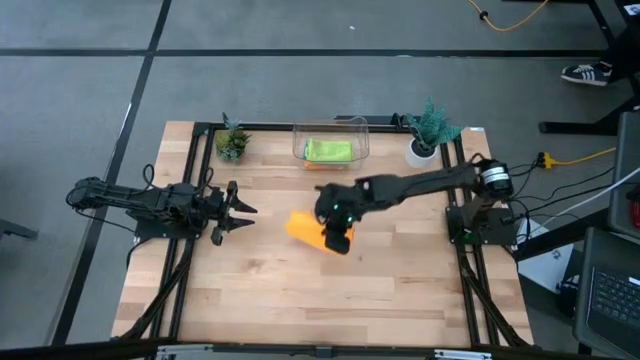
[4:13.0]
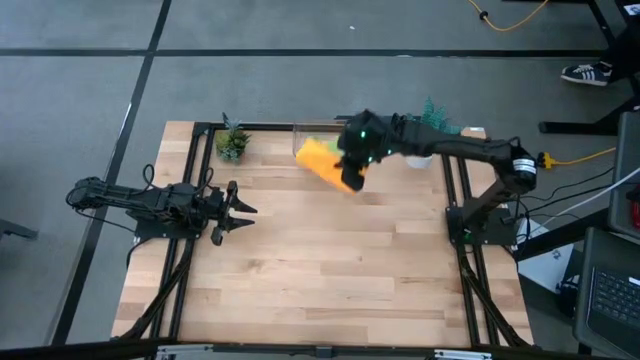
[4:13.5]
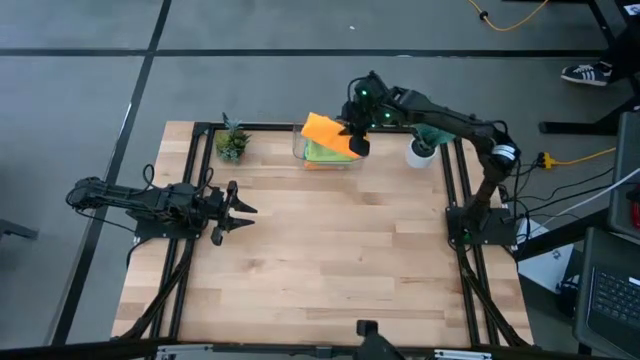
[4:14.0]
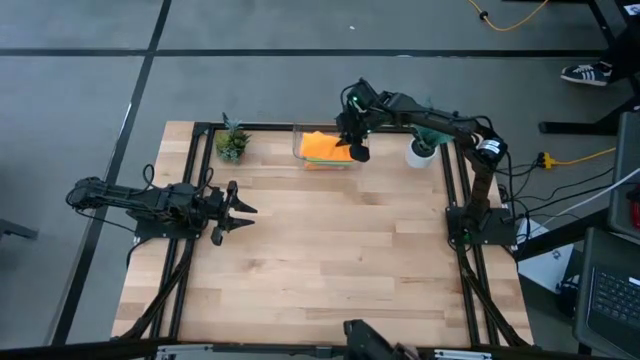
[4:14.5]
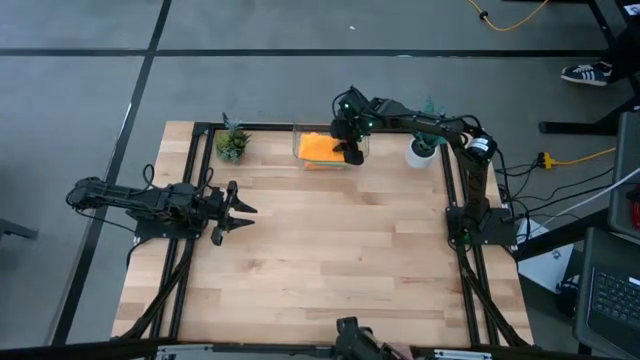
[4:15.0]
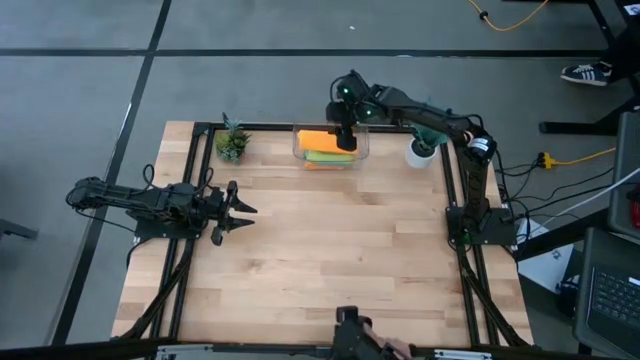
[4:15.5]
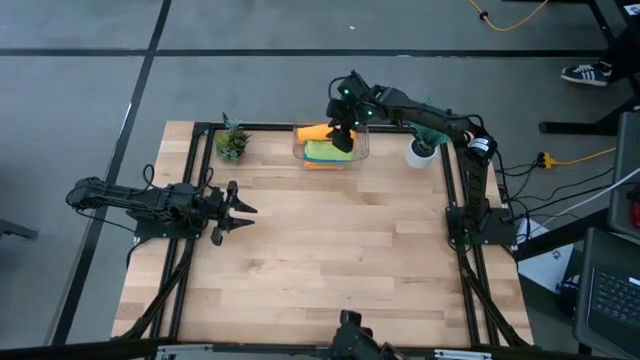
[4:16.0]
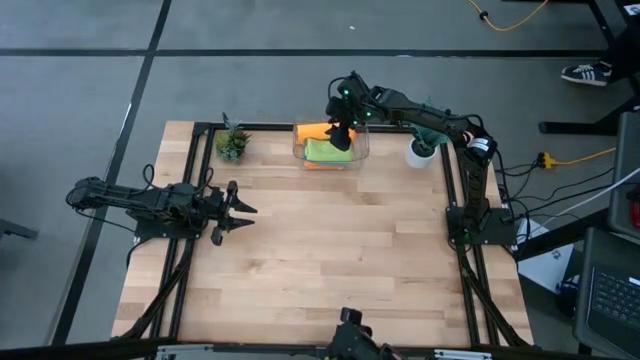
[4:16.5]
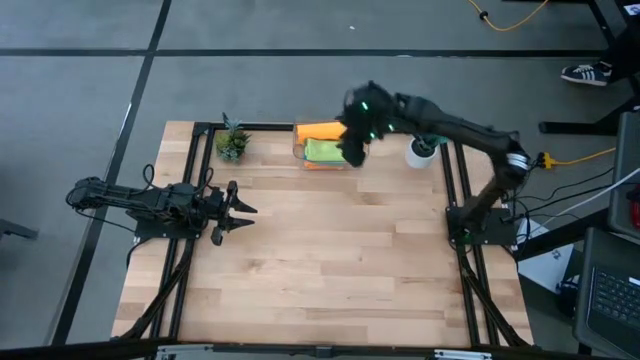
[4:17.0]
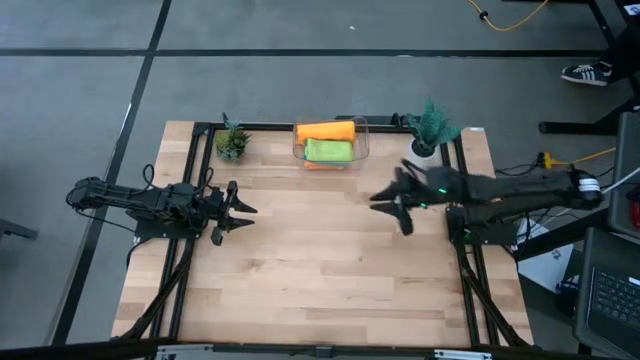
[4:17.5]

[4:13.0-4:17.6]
Task: Fold microfiber towels
Put the folded yellow towel into the transparent bin

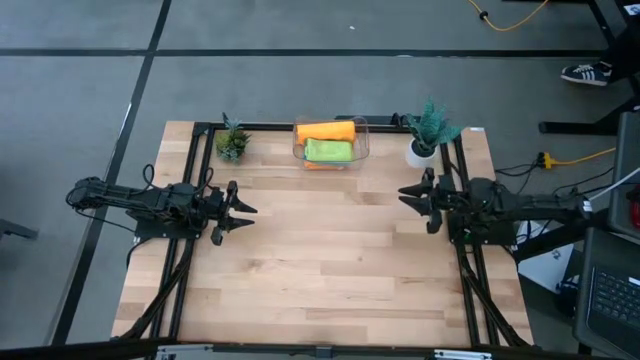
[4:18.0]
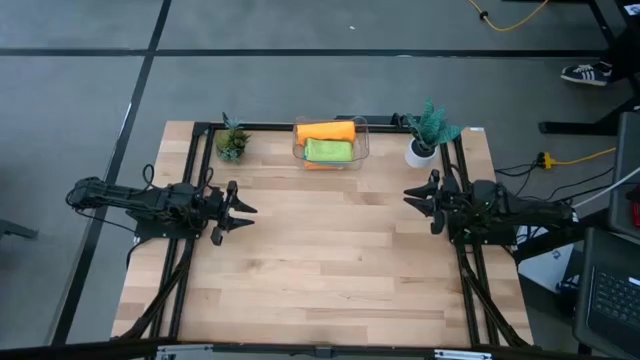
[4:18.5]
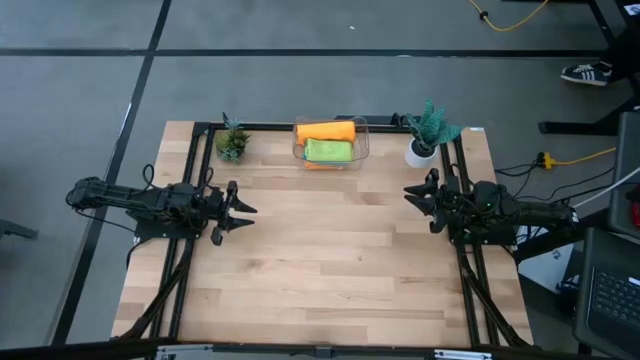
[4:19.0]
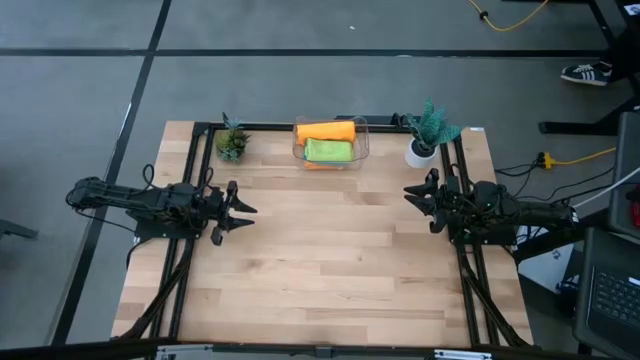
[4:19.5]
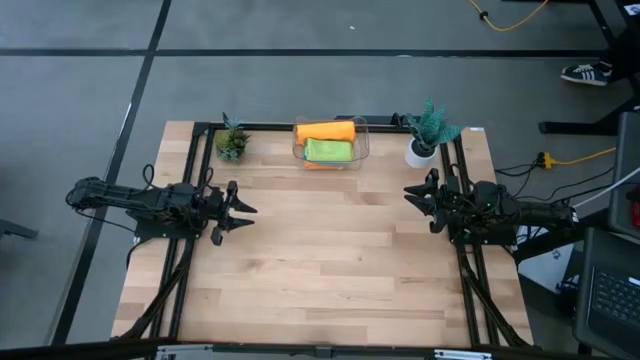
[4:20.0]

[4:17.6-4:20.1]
Return to Home Position

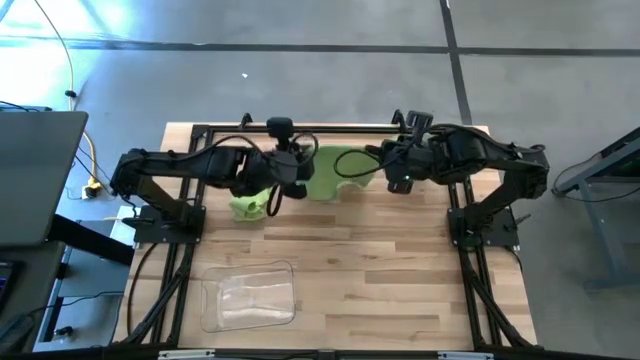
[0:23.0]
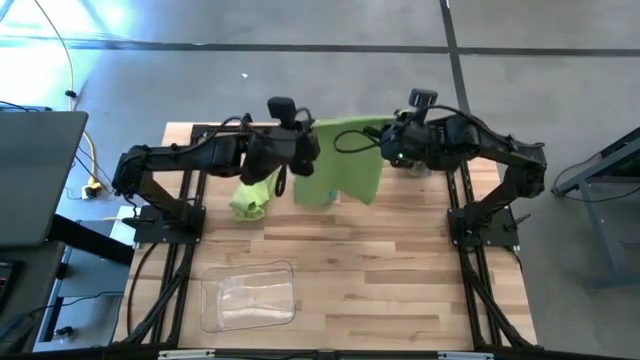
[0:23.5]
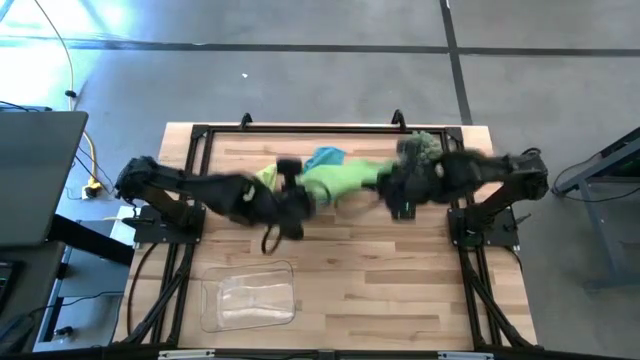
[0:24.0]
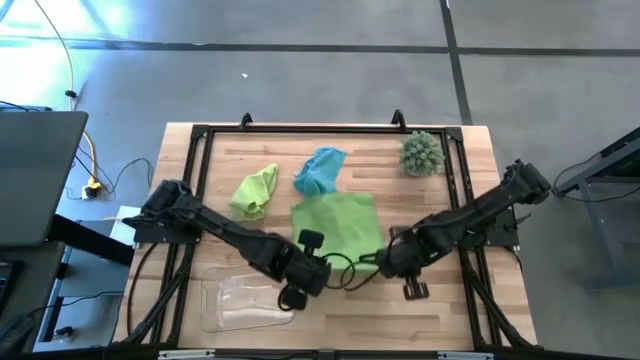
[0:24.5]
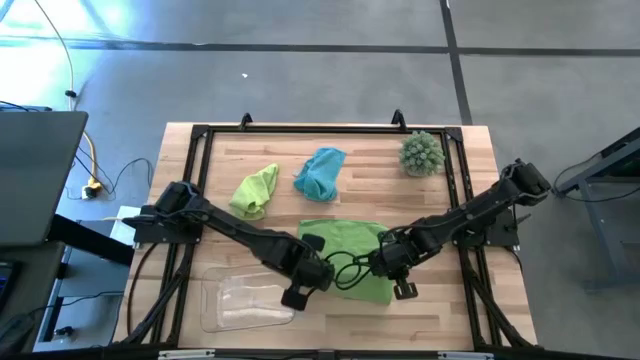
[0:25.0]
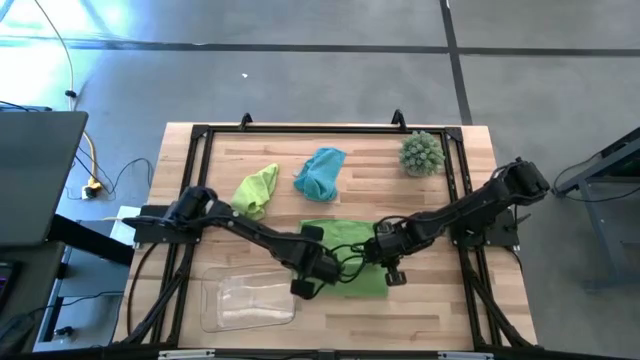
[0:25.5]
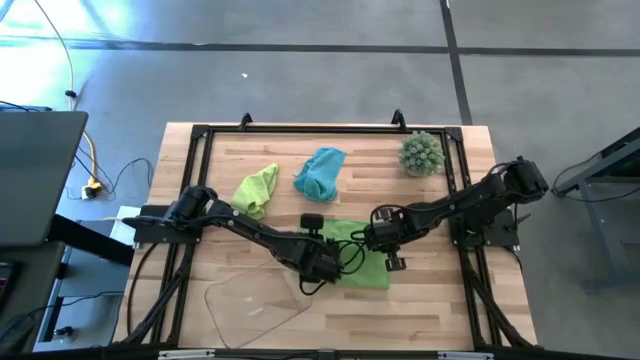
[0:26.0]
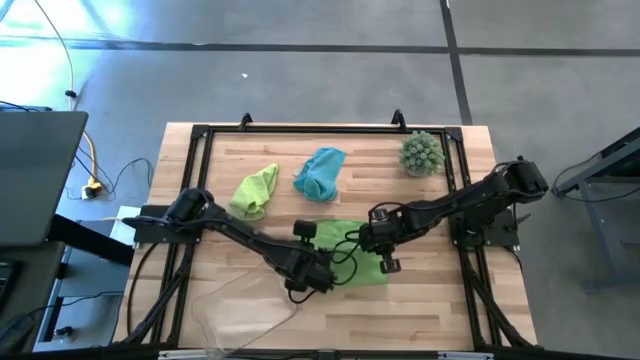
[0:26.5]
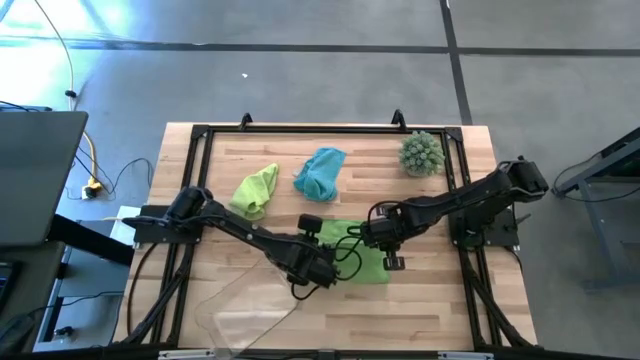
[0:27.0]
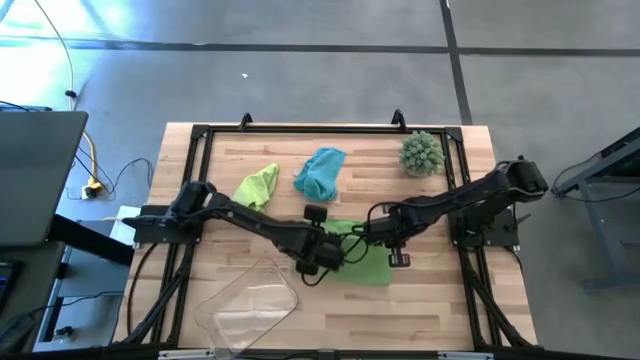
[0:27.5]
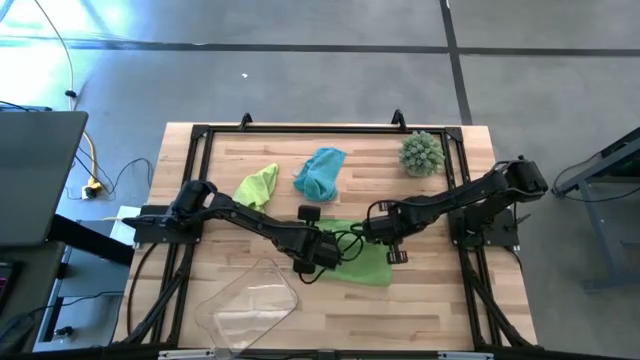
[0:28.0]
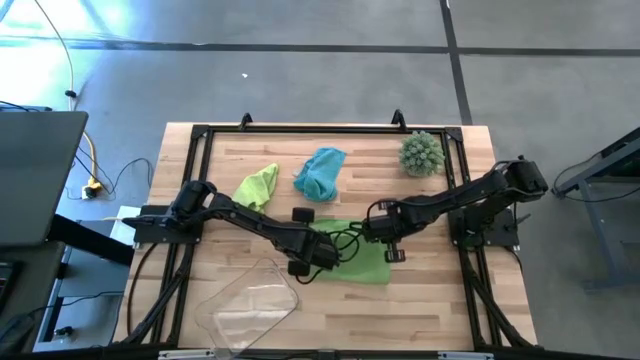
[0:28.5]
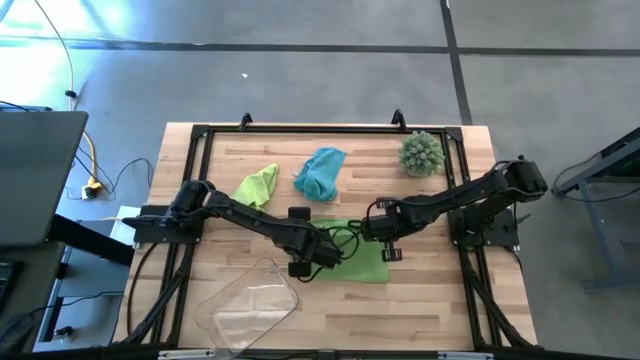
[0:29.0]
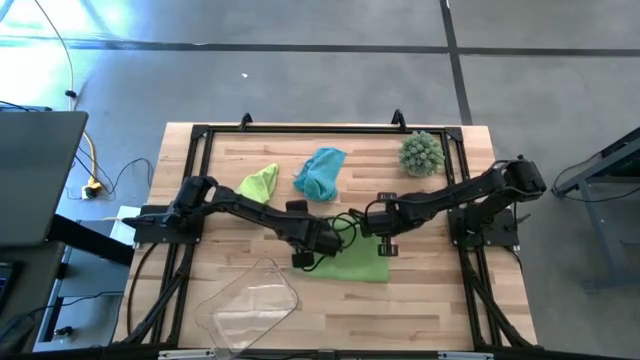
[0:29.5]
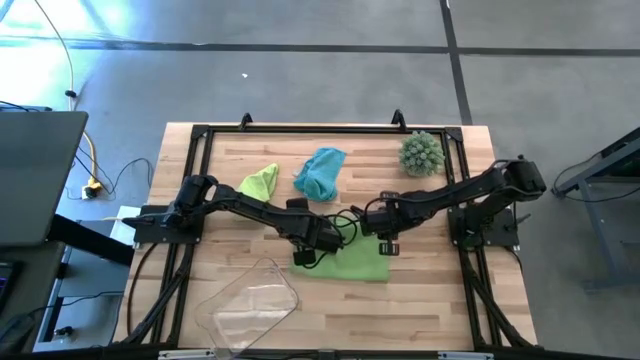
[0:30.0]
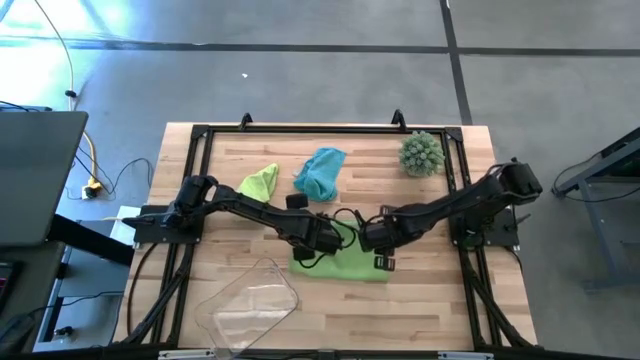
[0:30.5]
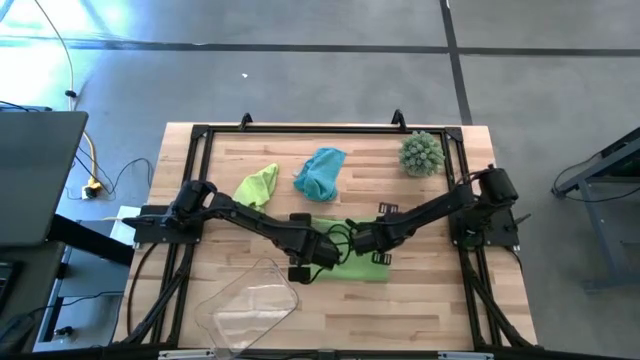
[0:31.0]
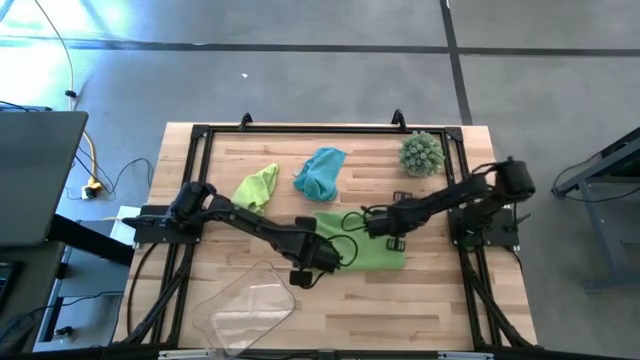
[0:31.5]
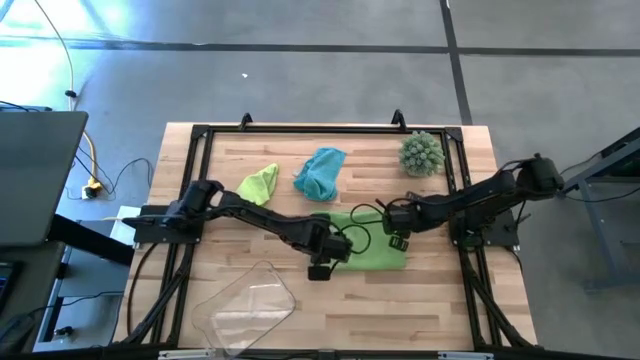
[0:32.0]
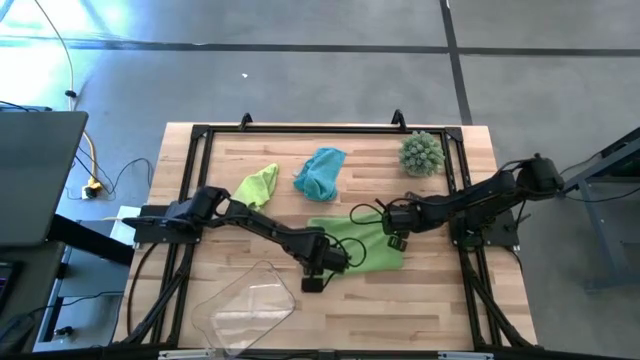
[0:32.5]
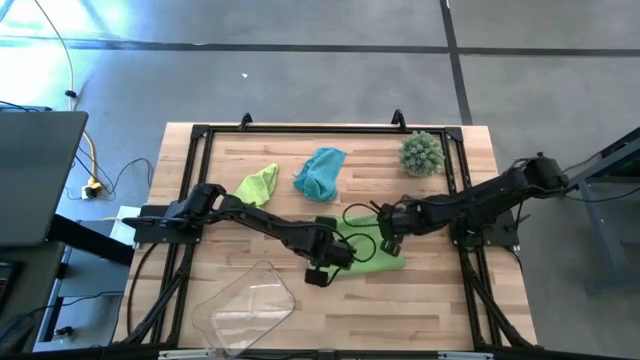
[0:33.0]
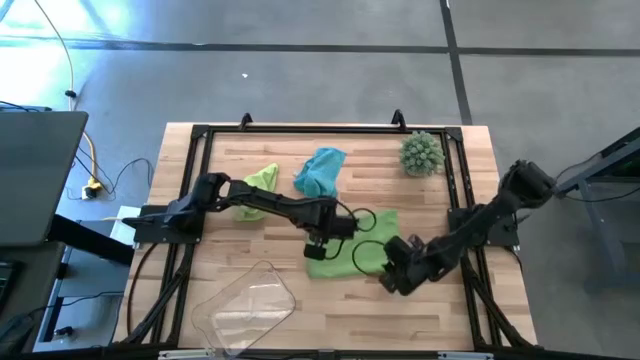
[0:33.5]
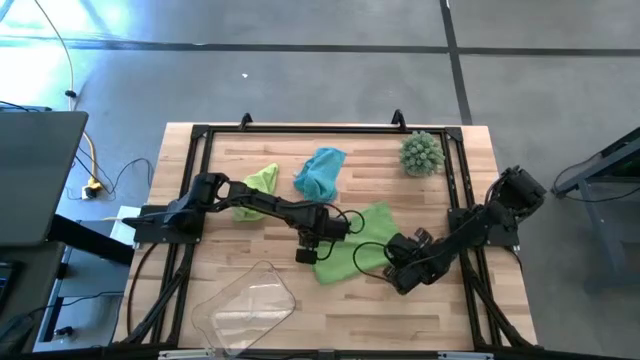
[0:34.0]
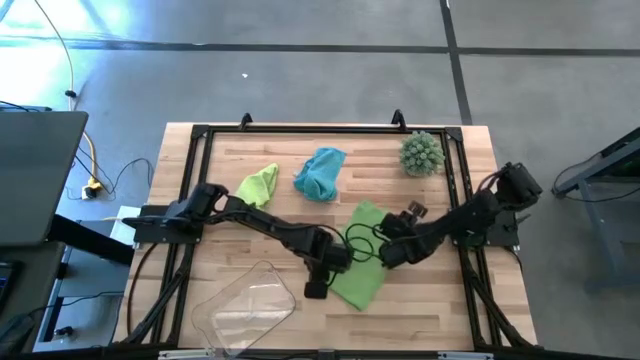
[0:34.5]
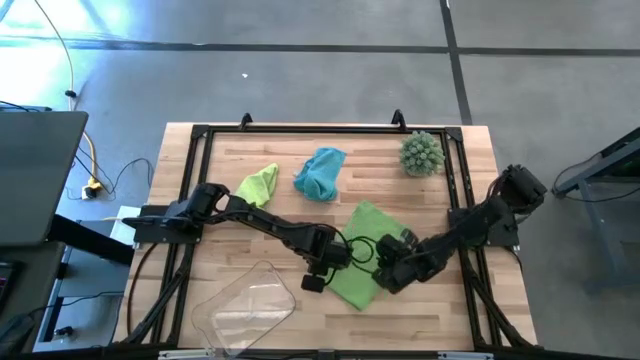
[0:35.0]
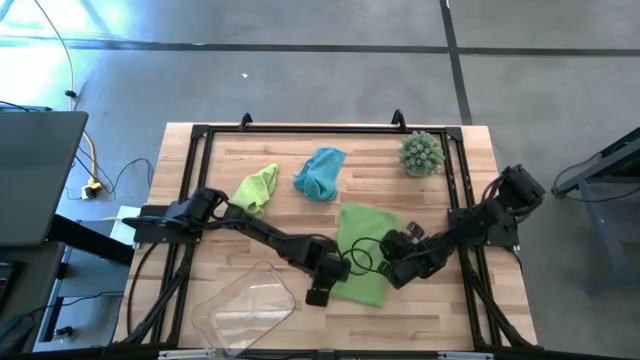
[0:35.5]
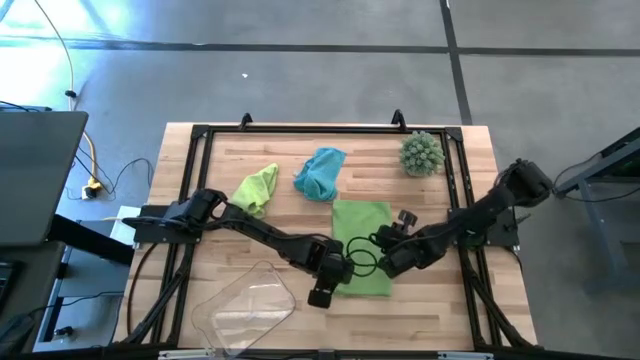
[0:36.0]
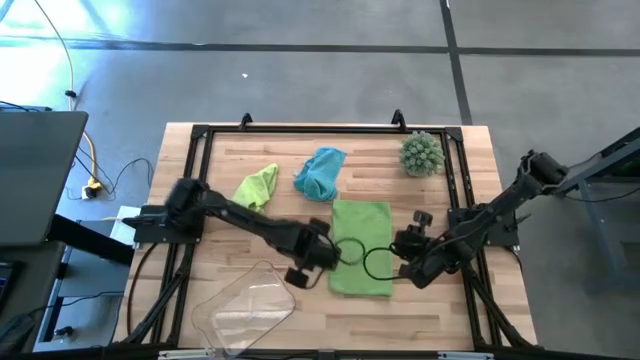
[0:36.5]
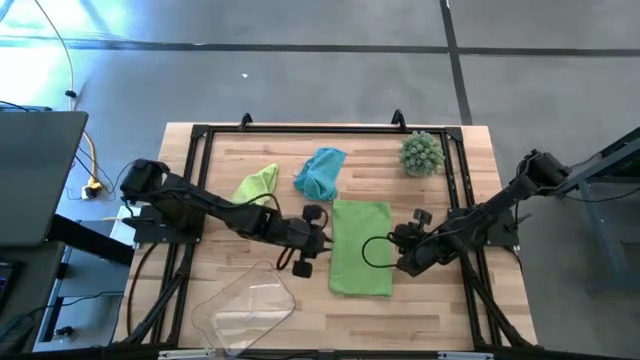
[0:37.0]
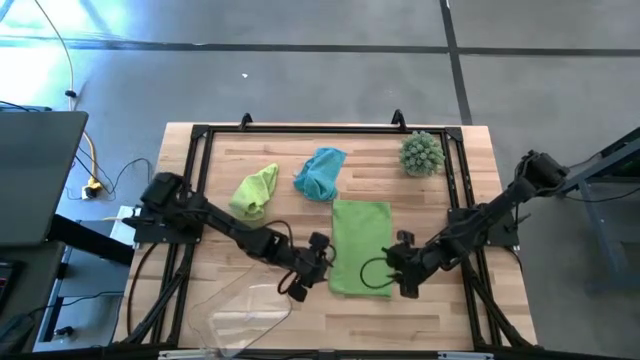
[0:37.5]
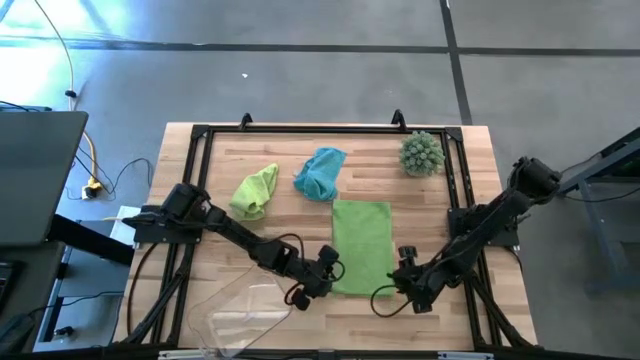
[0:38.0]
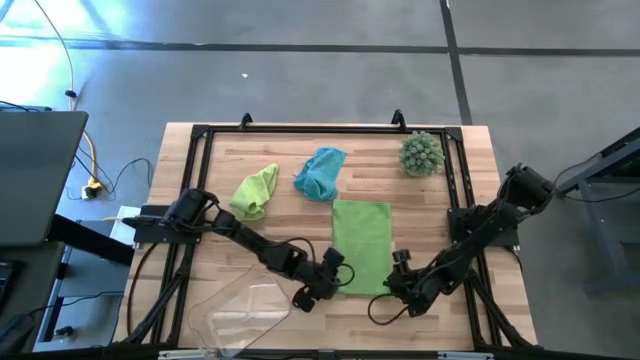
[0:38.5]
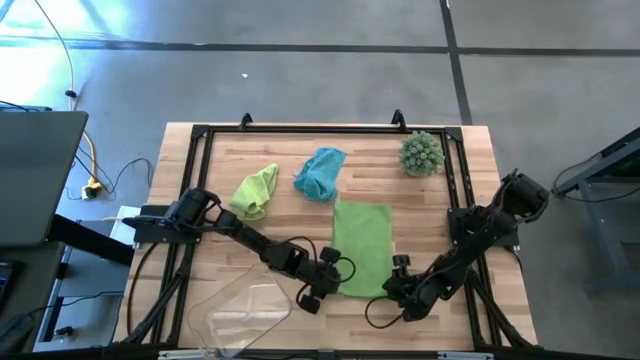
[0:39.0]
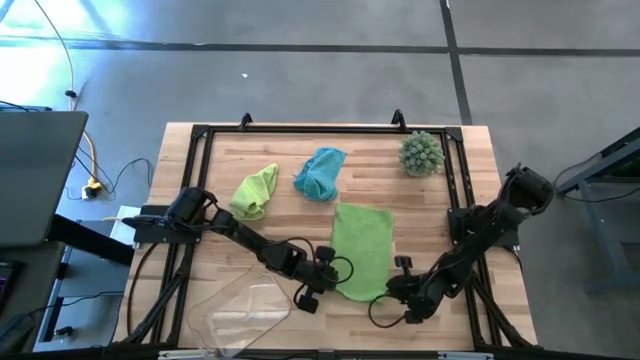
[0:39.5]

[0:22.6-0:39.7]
Task: Roll microfiber towels into tight, uniform cylinder then place into a basket
Roll the green microfiber cloth
